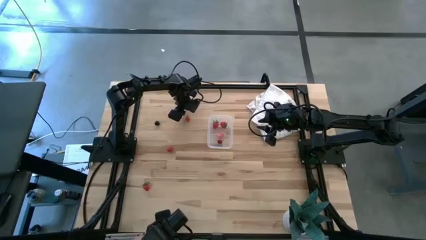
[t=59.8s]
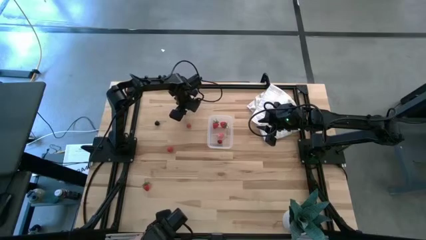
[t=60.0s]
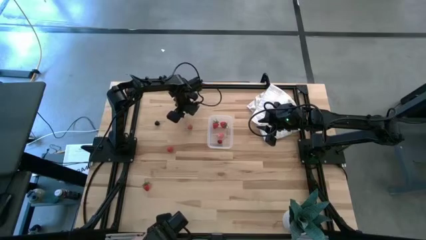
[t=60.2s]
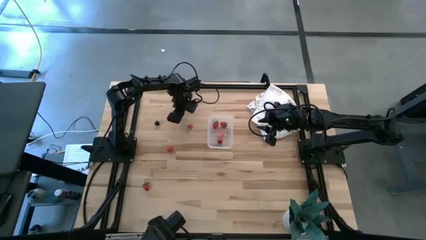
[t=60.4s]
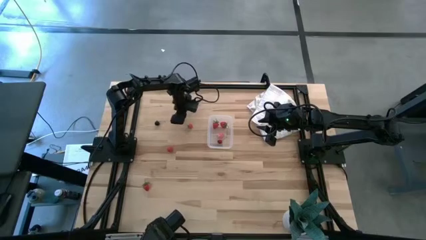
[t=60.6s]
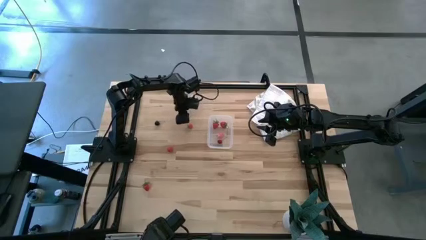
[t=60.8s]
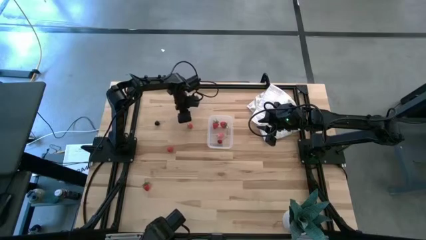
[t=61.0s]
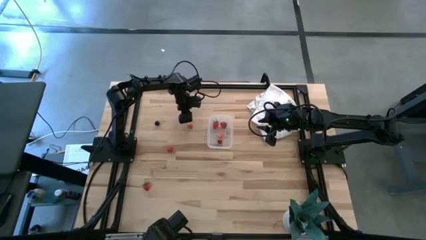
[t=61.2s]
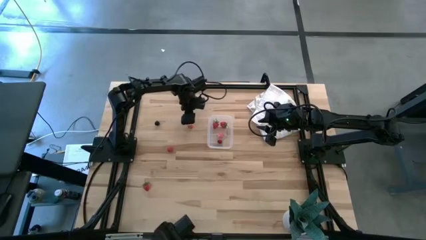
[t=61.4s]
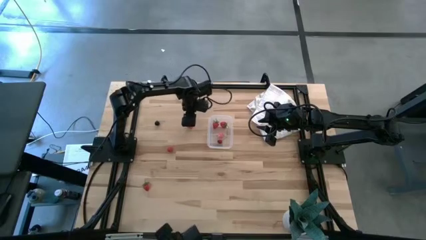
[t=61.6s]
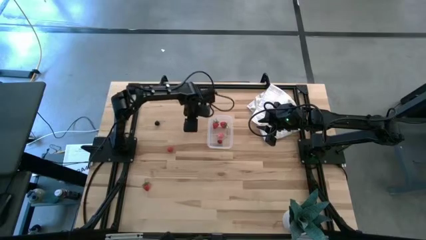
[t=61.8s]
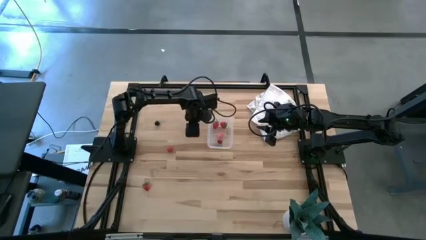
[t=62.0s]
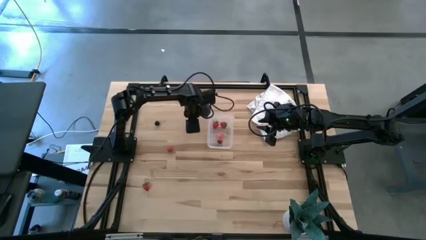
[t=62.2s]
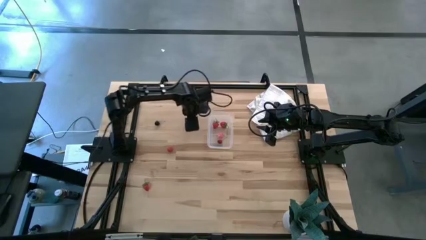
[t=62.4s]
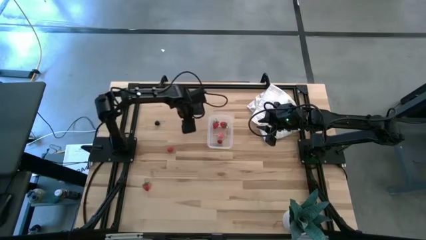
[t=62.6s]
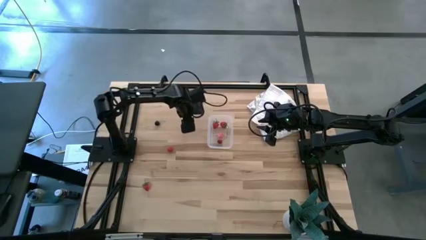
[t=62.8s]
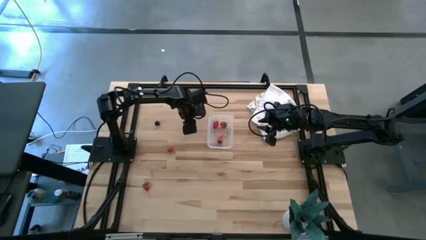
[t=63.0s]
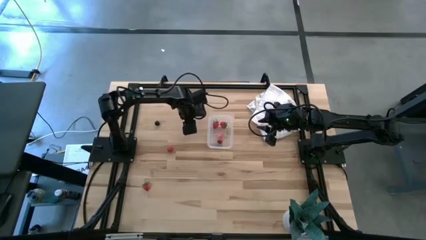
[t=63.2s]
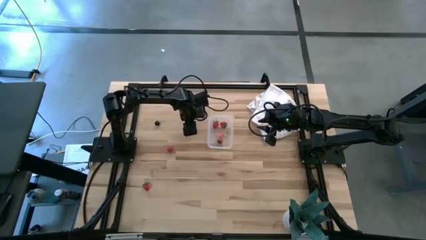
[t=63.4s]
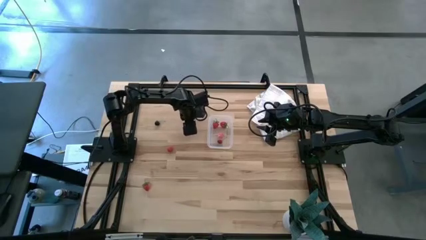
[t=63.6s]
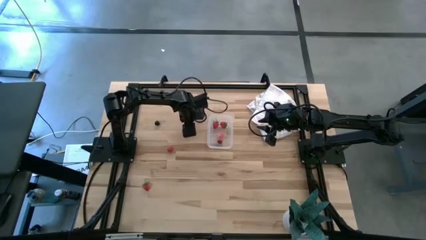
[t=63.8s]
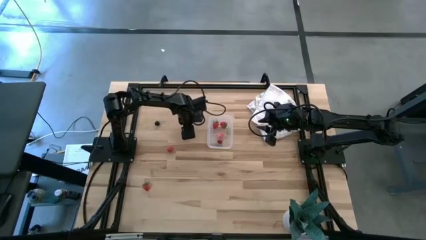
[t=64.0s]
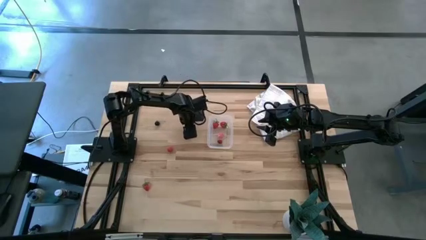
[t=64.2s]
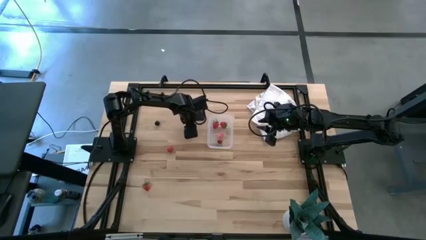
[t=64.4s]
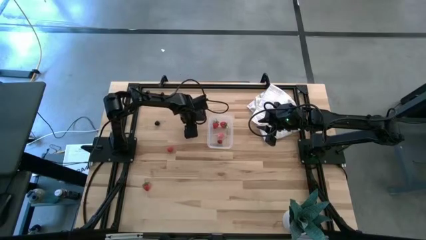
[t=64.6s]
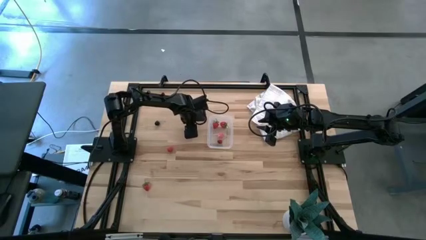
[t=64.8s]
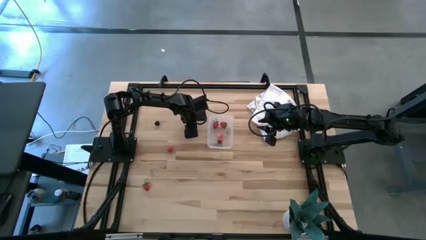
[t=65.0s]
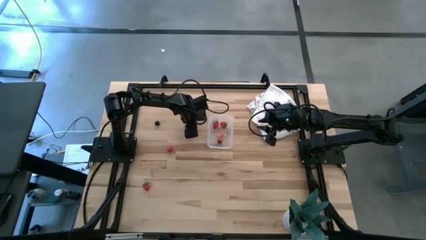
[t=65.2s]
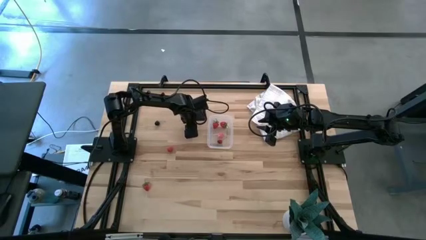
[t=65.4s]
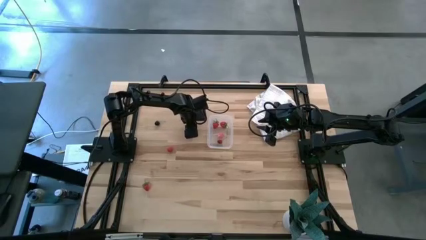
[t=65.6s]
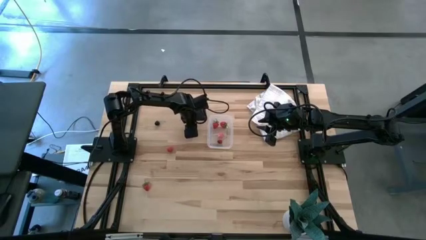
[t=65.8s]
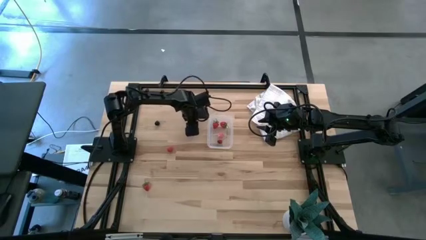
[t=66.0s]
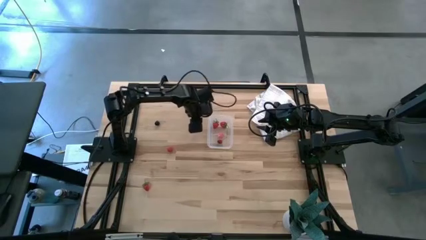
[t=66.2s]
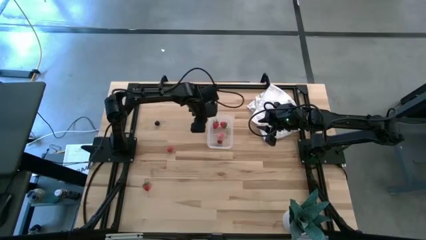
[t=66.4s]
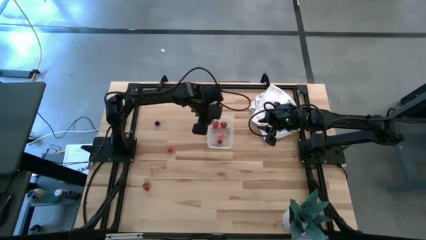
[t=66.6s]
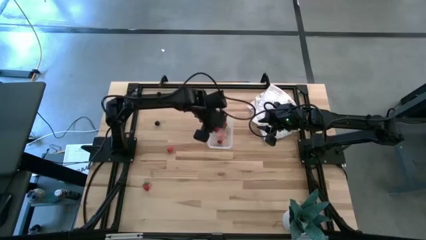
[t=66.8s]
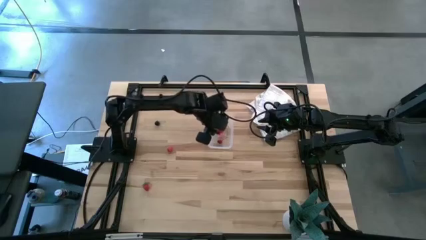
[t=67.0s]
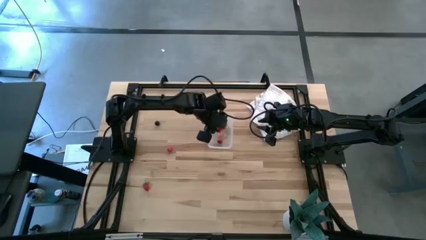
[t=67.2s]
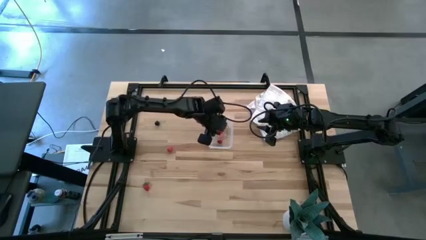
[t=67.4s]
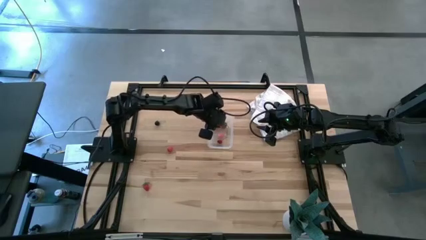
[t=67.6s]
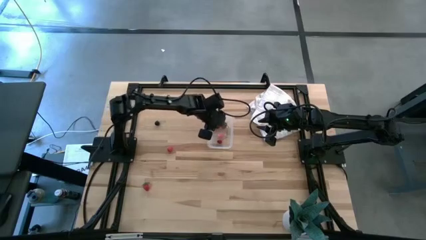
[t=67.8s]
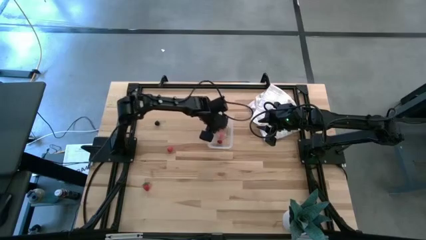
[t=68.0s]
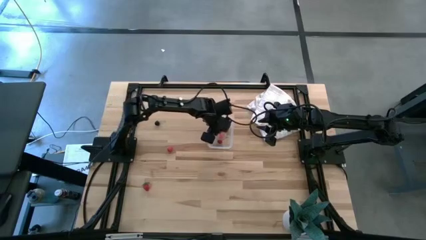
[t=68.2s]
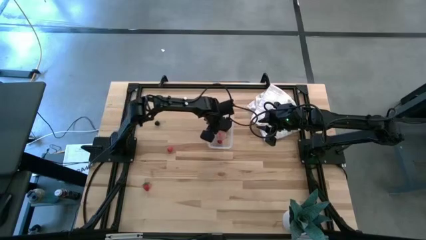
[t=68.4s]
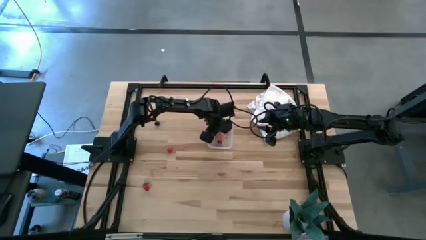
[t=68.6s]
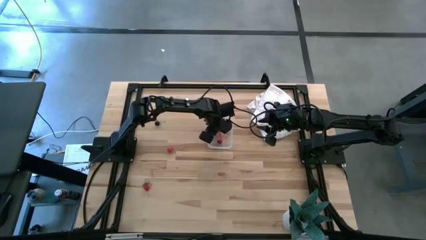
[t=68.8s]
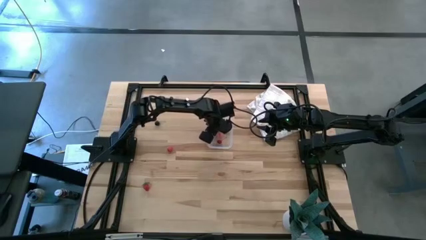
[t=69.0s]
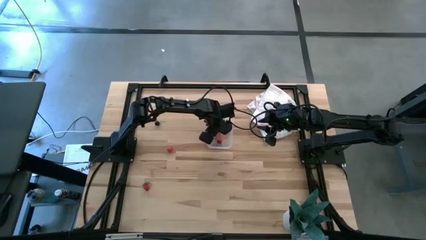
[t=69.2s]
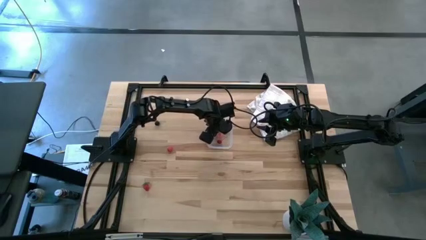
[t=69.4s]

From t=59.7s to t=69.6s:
Task: Pick and placing Produce into tupperware
Put the strawberry into the transparent container
